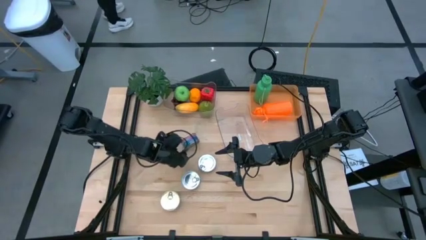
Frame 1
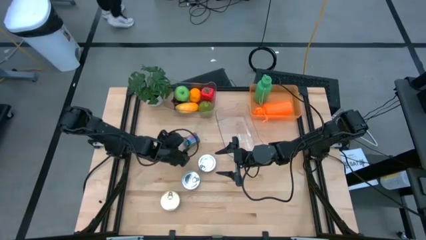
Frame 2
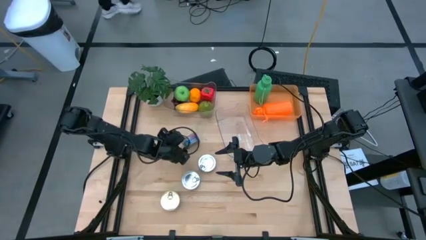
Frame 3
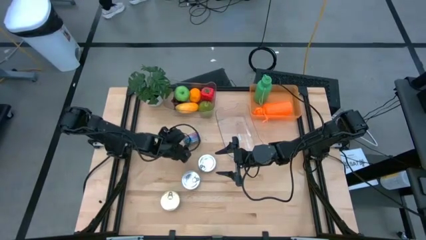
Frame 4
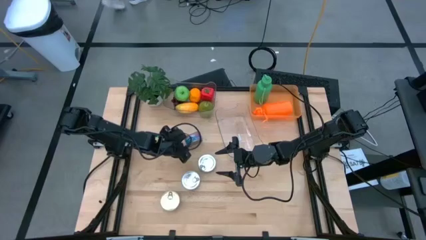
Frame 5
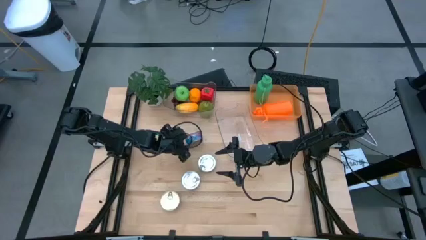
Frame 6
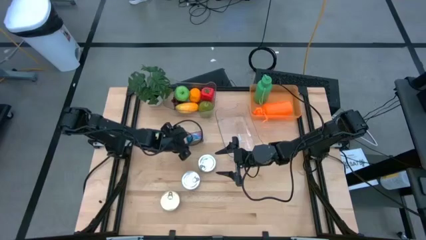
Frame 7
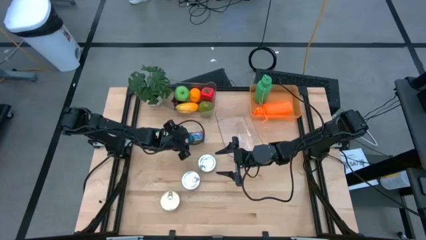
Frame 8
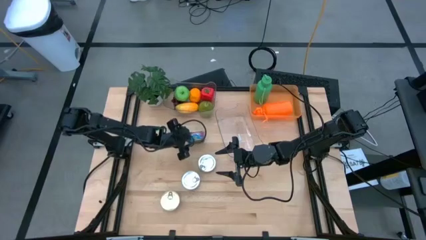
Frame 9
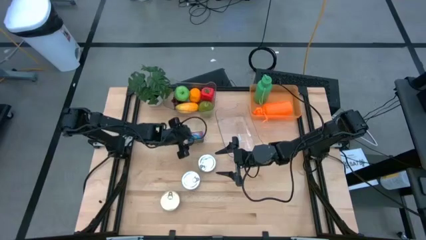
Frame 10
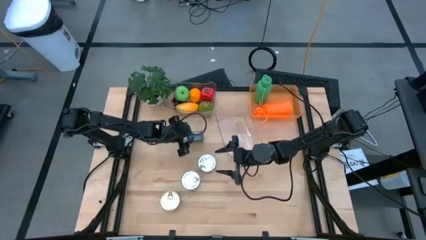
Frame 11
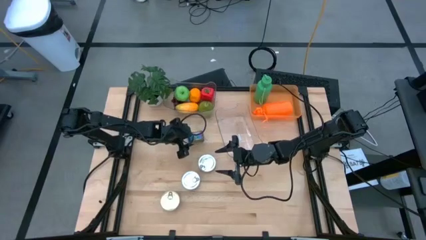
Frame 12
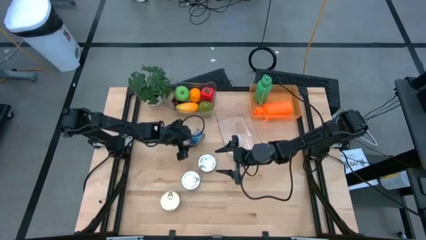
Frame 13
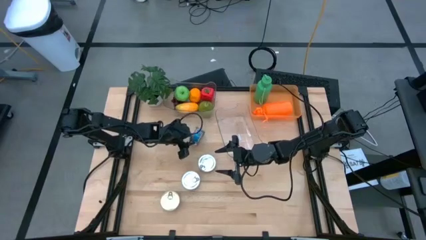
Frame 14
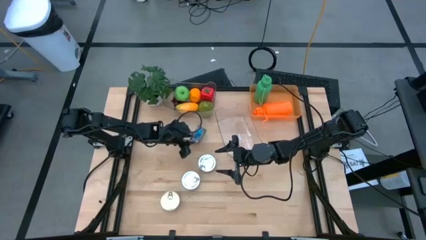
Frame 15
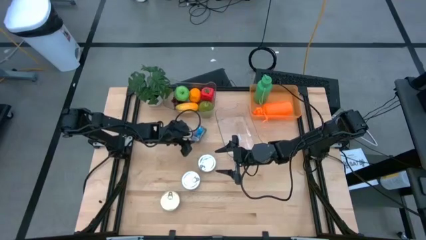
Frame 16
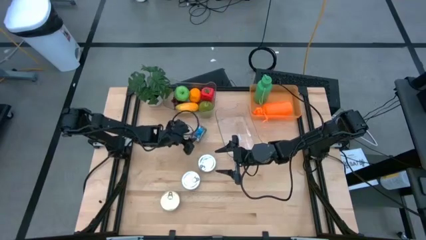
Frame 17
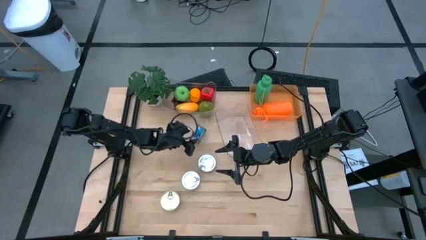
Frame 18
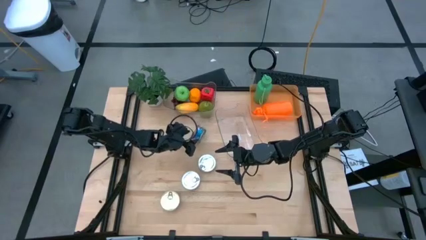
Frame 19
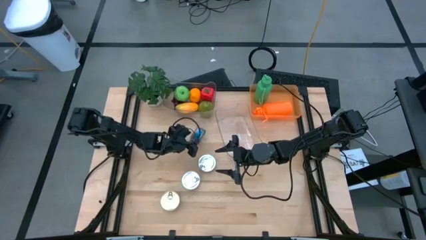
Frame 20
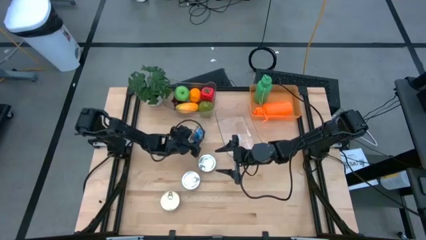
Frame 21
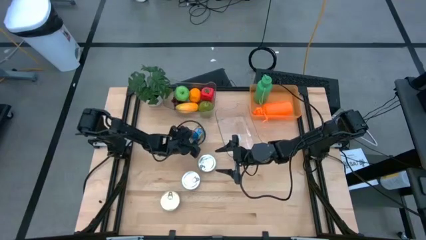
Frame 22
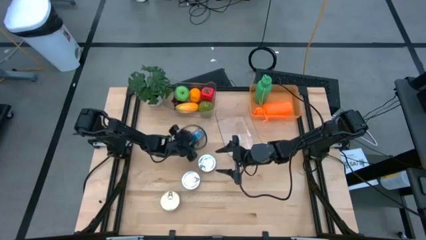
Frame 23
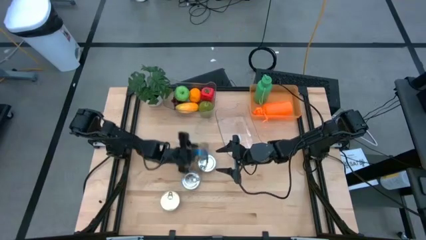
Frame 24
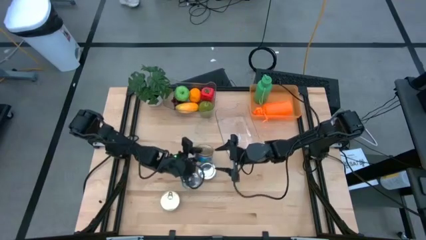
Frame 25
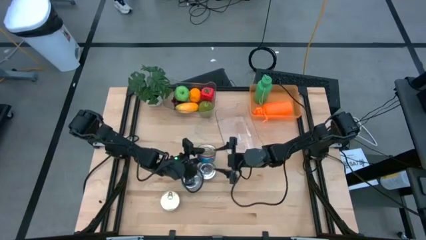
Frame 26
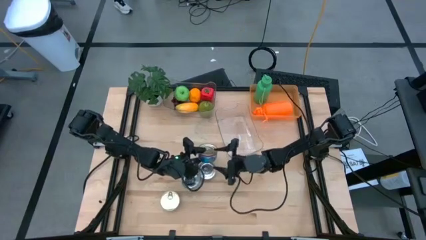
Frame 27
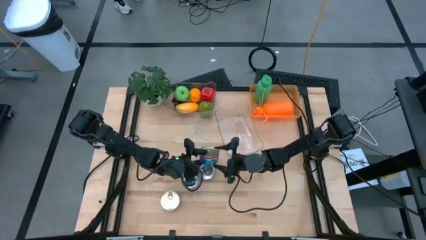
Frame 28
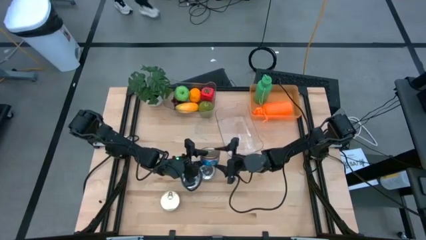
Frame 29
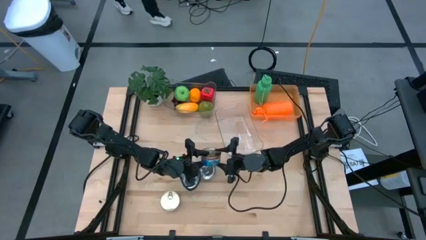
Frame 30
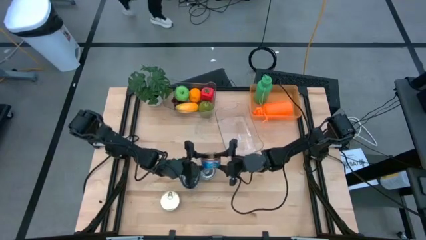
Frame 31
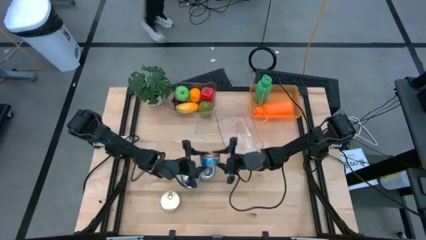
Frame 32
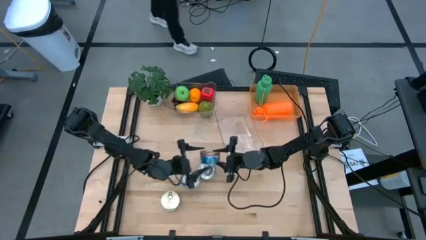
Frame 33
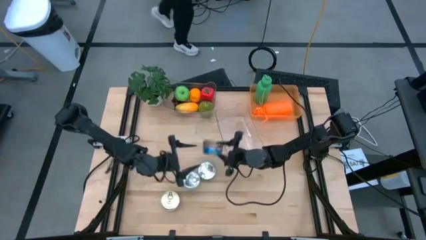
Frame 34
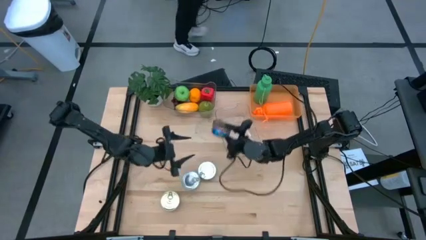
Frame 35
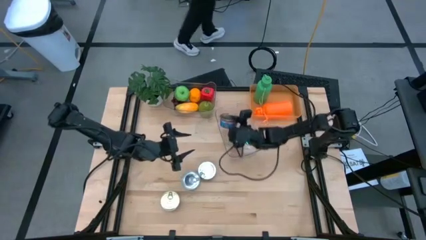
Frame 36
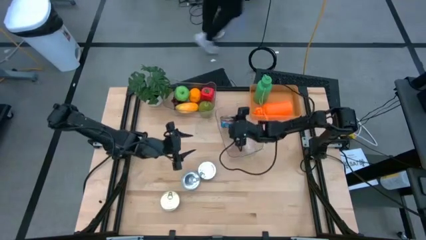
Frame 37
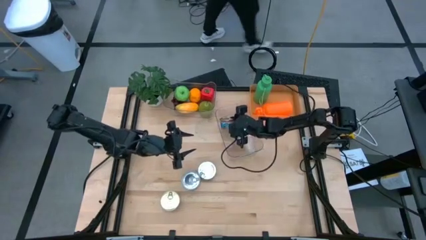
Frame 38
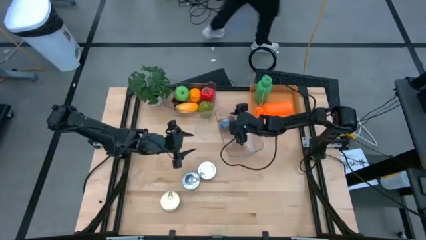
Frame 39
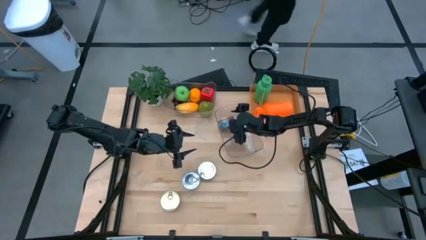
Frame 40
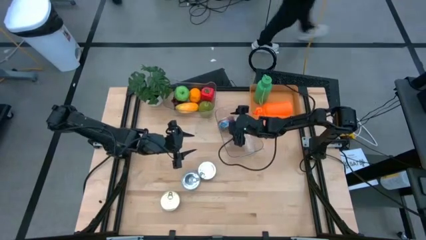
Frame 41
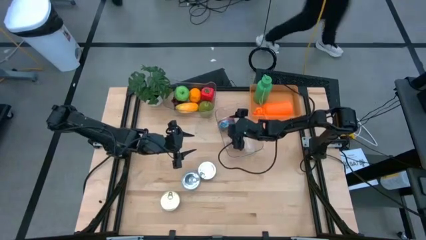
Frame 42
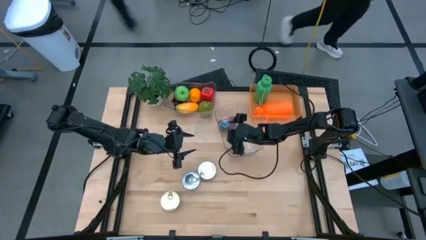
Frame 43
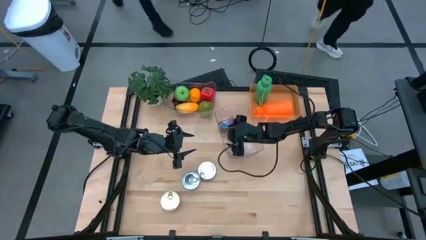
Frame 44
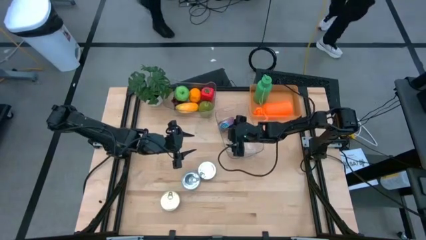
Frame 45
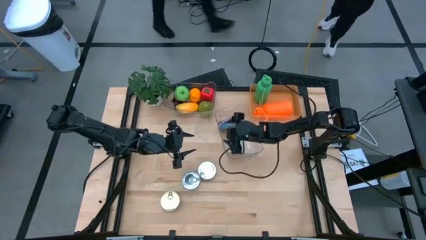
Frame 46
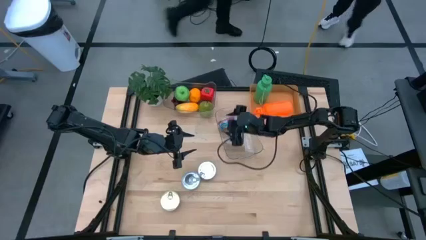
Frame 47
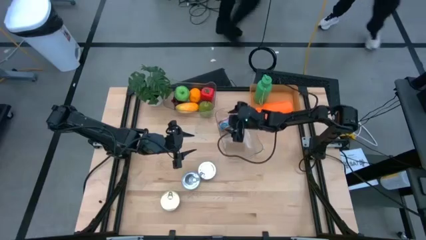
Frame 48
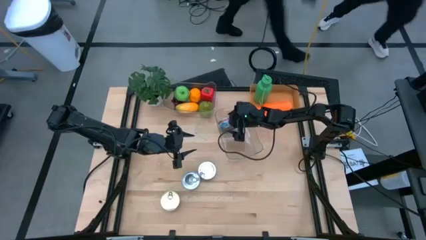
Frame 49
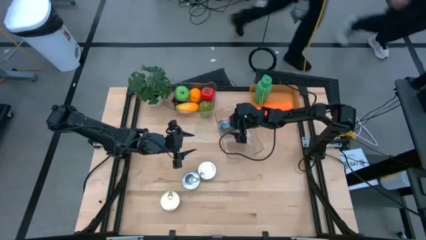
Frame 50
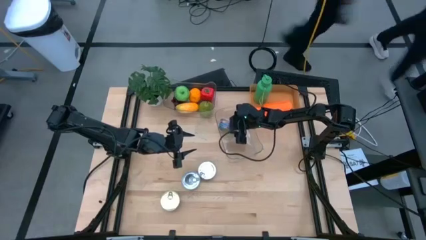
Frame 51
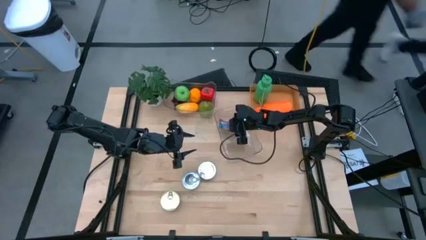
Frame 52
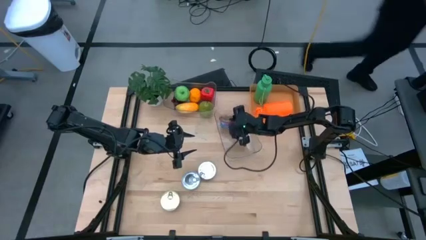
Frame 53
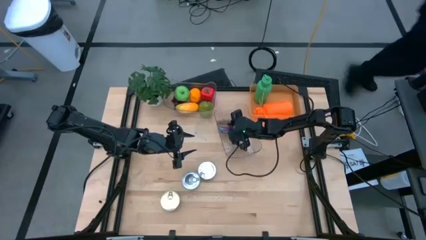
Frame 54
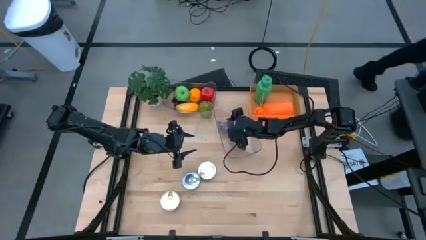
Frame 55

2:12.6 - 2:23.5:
Task: Pick & Place Food Item
Put the top blue tuna can into the bottom transparent bin

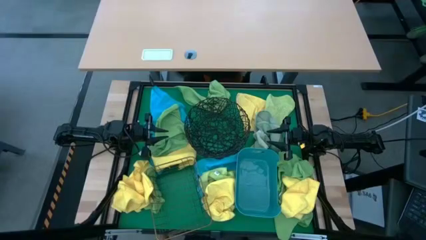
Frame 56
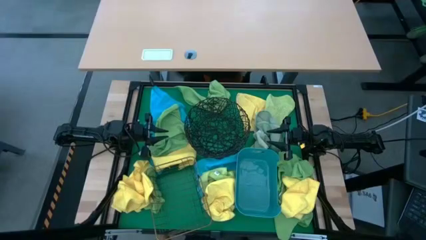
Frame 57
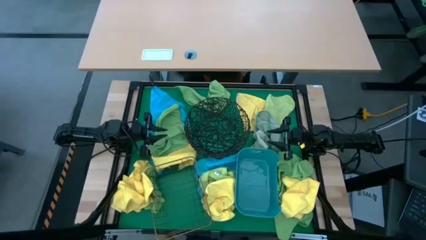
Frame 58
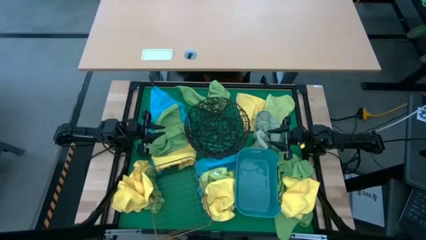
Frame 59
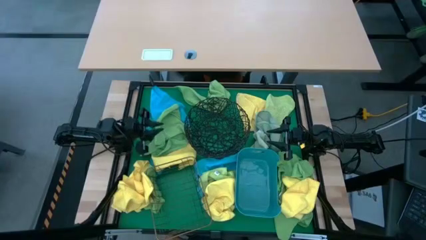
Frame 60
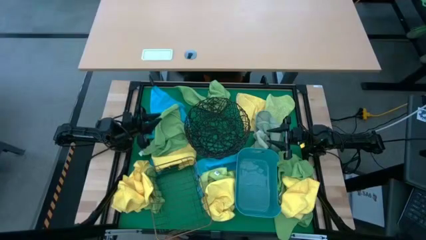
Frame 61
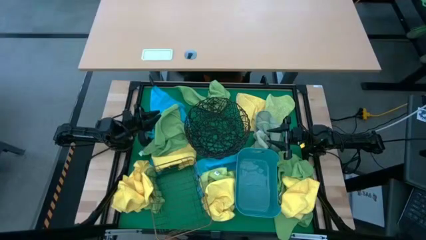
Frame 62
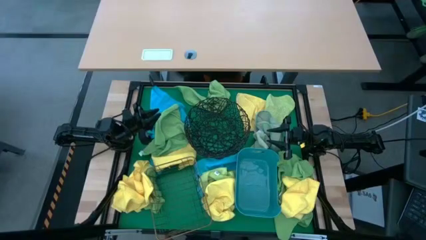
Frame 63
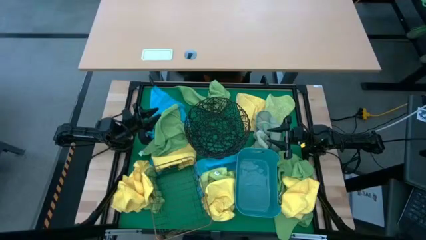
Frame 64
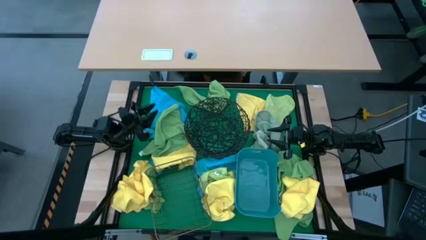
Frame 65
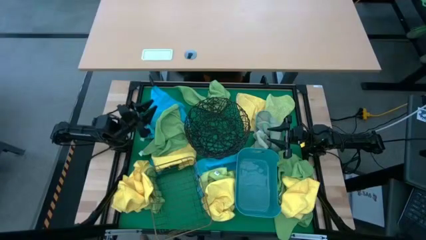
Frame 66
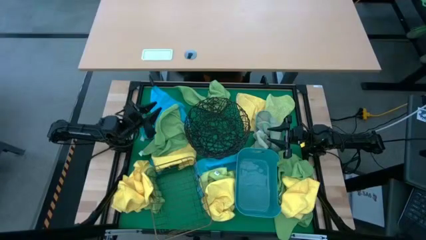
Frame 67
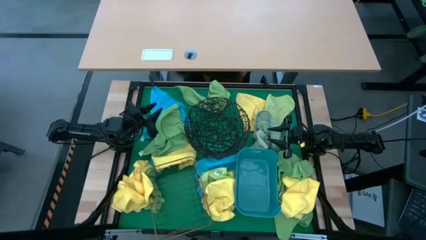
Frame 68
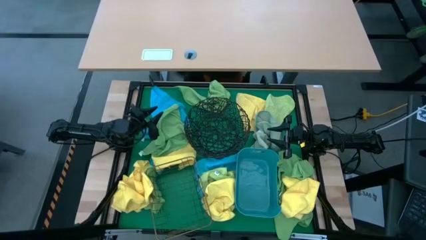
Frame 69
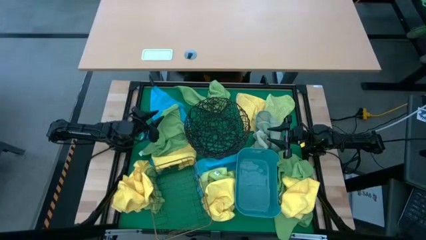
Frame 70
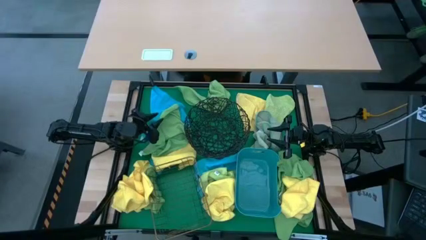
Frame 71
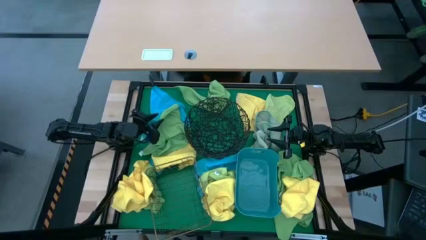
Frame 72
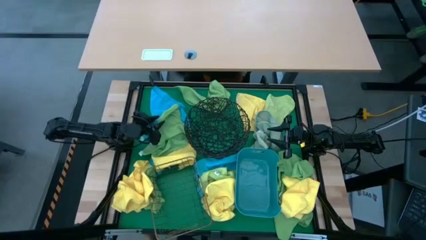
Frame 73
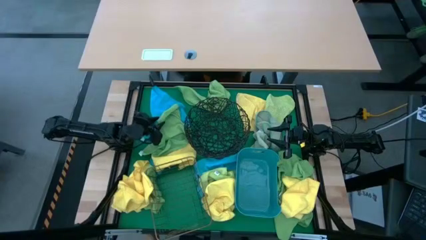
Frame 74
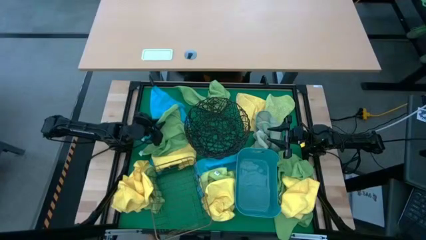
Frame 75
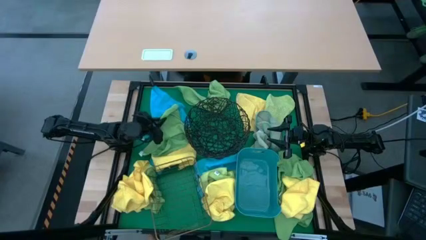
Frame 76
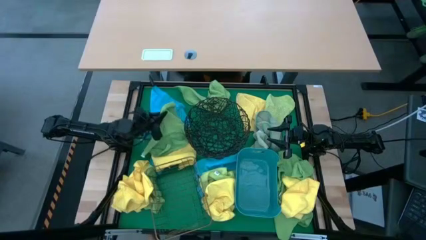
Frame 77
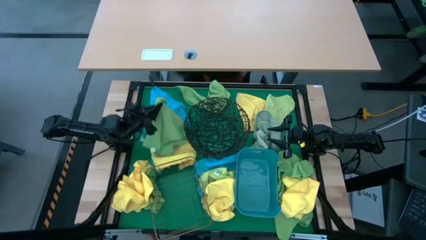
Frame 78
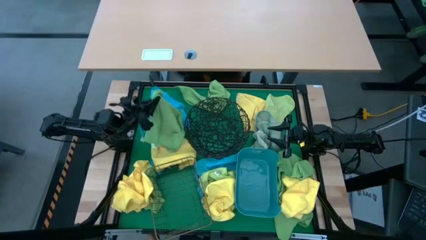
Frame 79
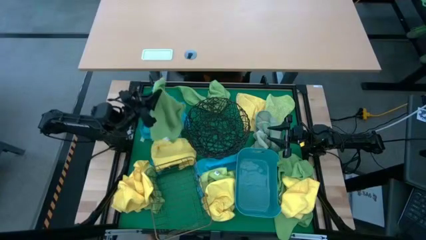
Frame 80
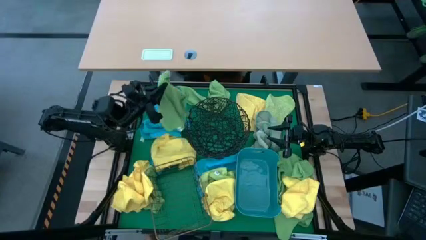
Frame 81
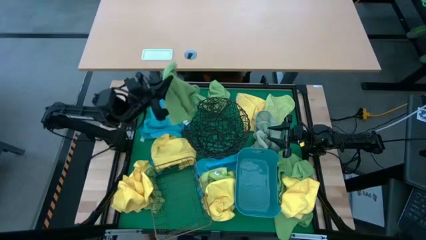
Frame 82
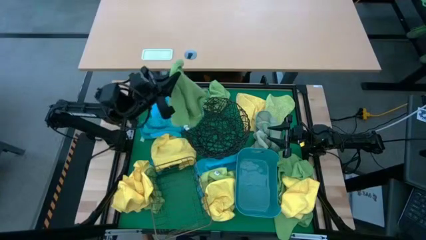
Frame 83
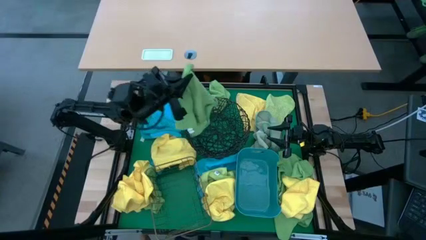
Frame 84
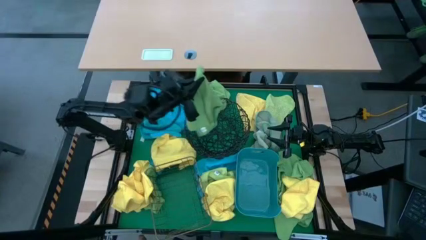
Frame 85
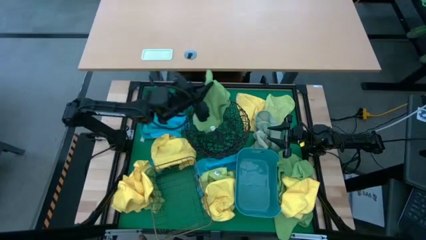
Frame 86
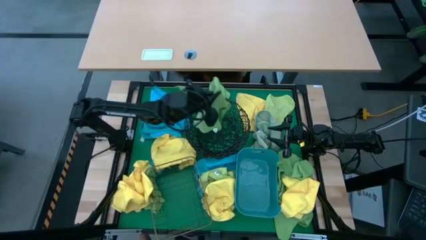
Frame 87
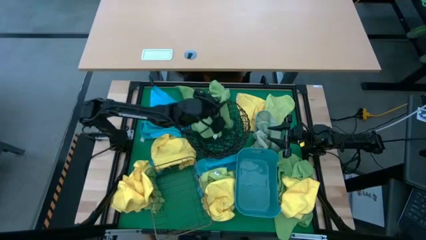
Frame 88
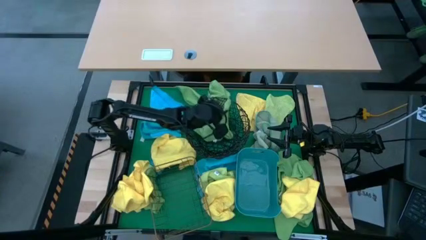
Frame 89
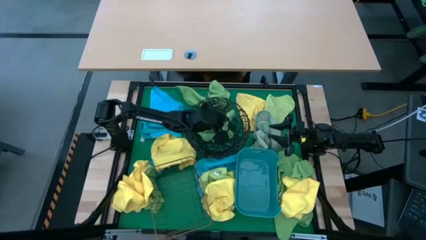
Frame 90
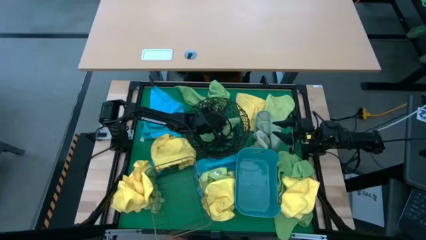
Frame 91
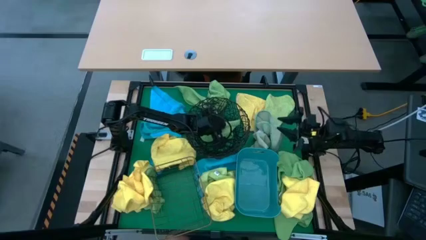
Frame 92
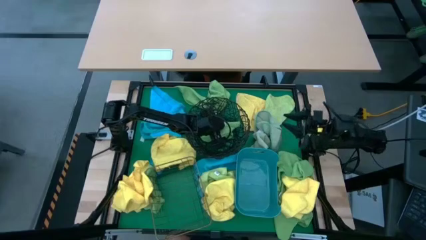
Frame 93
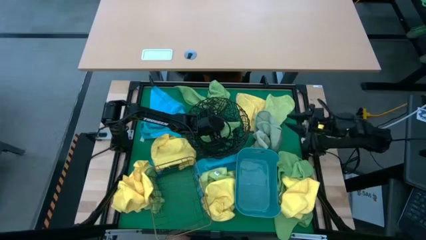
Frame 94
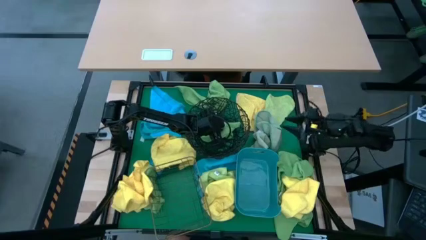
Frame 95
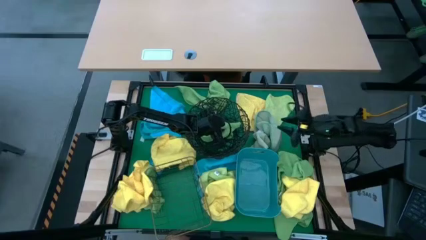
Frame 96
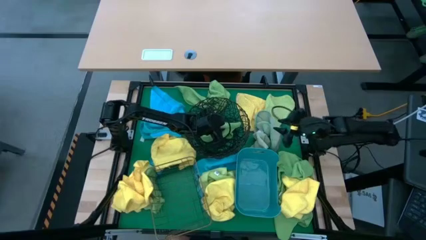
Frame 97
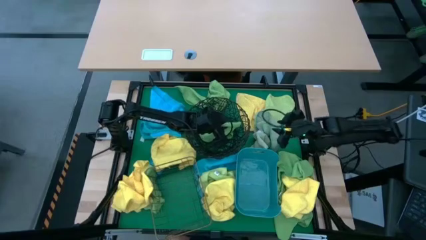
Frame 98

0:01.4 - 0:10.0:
Task: Sort microfiber towel by color & place in baskets
Put the green microfiber cloth into the round wire basket
